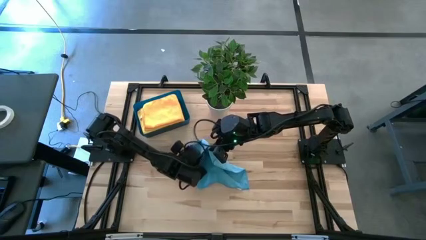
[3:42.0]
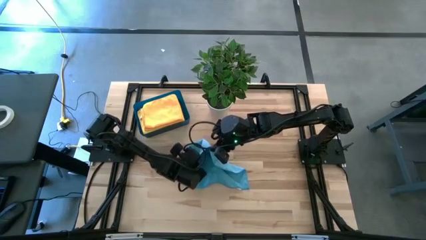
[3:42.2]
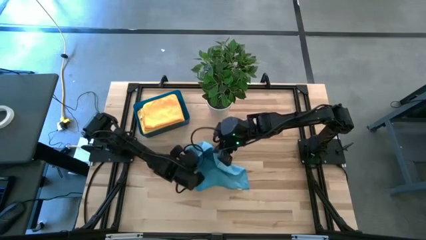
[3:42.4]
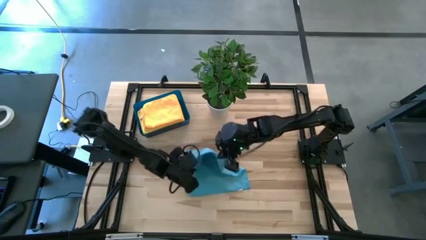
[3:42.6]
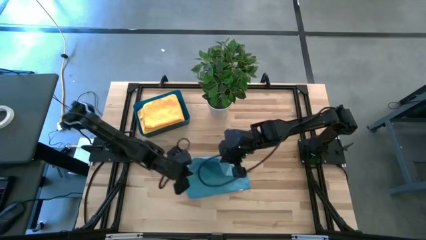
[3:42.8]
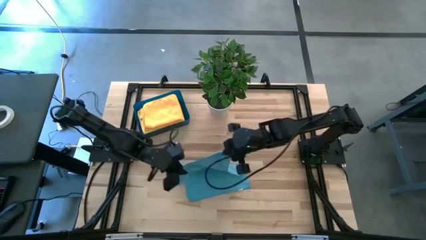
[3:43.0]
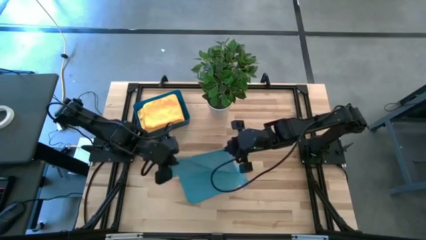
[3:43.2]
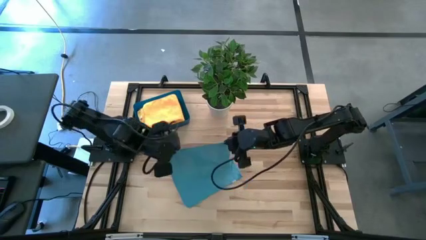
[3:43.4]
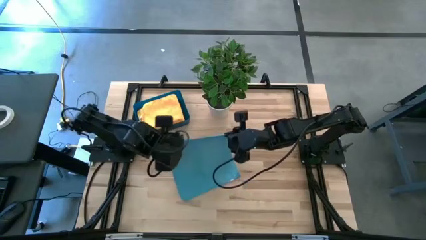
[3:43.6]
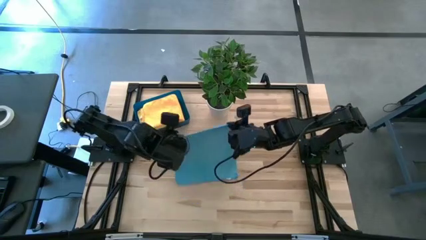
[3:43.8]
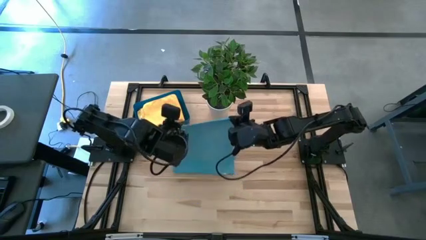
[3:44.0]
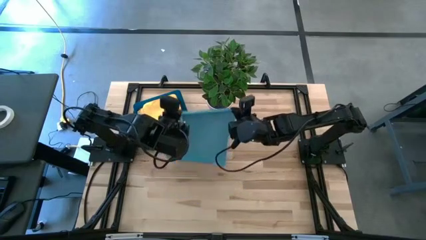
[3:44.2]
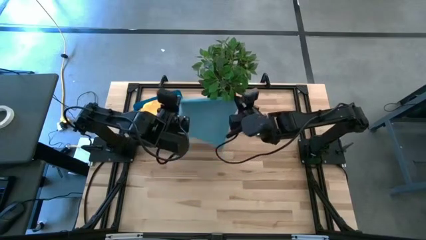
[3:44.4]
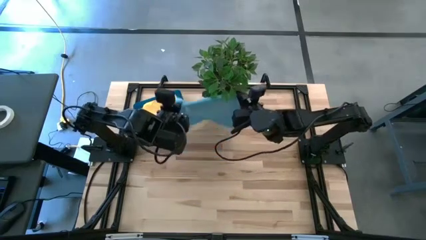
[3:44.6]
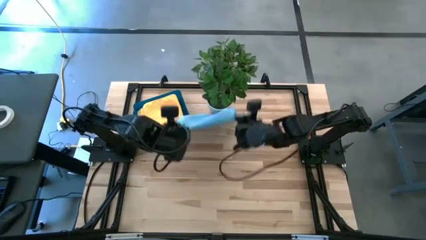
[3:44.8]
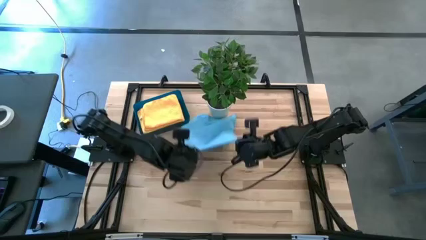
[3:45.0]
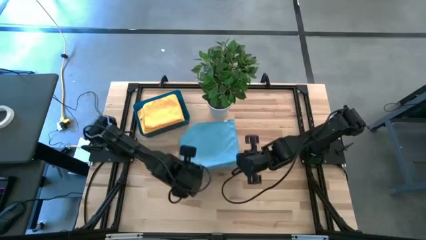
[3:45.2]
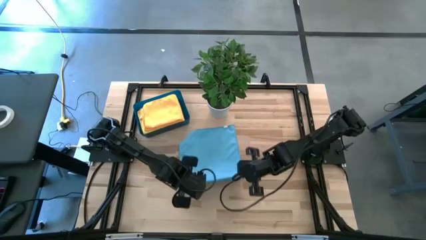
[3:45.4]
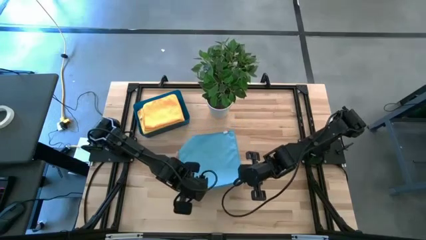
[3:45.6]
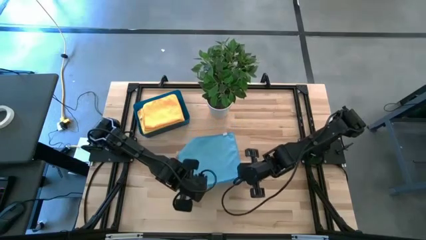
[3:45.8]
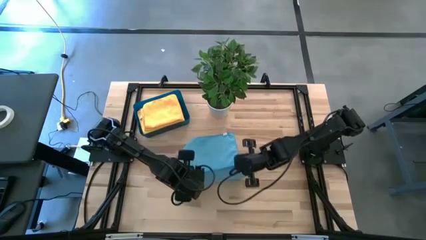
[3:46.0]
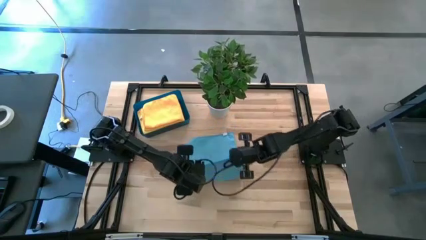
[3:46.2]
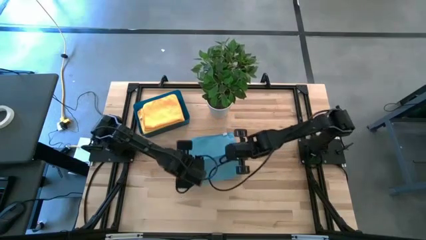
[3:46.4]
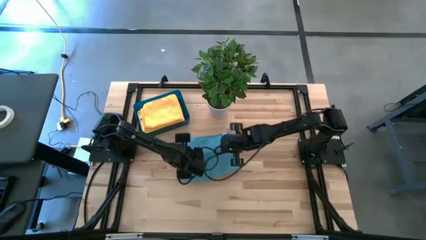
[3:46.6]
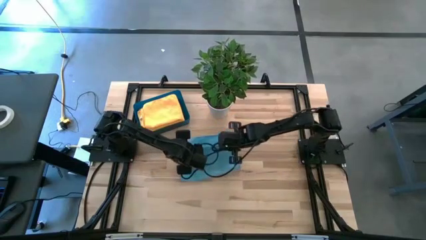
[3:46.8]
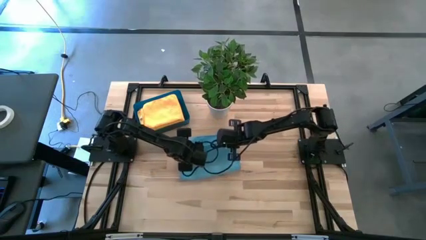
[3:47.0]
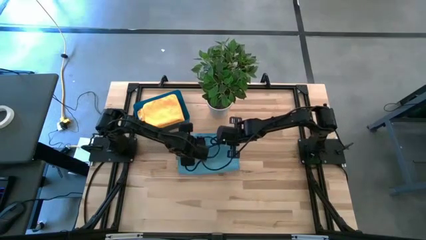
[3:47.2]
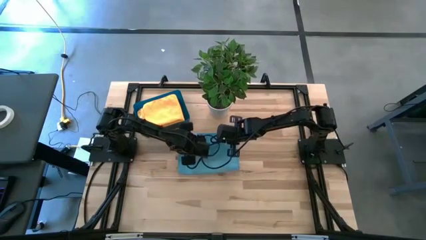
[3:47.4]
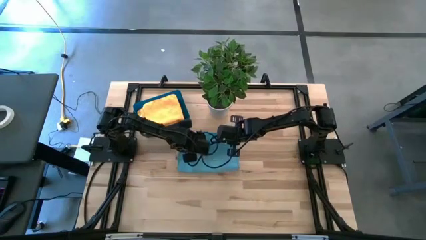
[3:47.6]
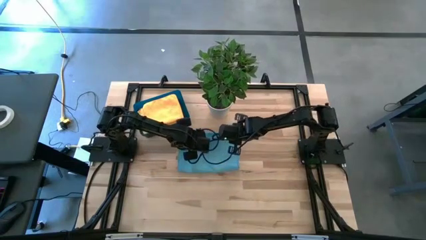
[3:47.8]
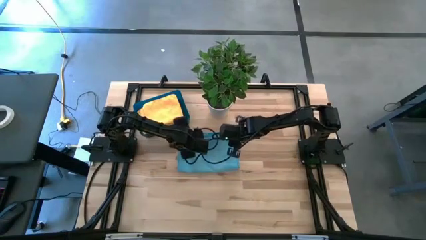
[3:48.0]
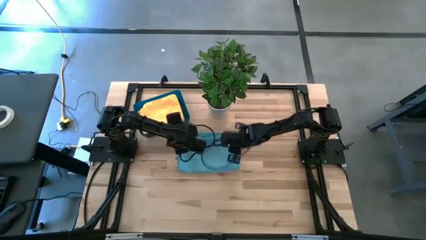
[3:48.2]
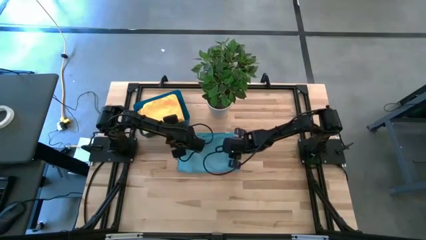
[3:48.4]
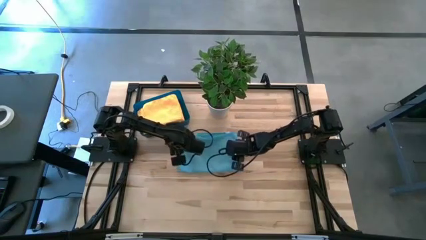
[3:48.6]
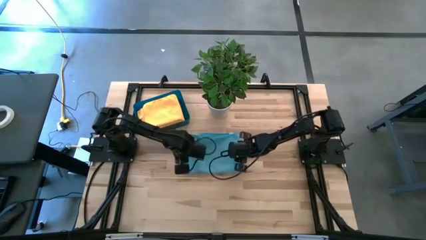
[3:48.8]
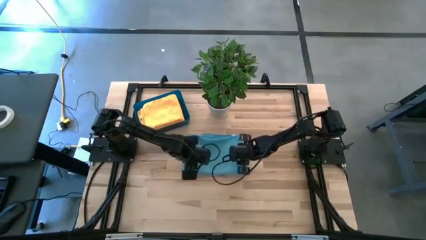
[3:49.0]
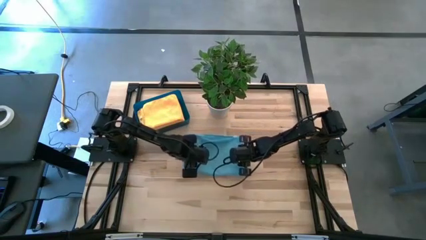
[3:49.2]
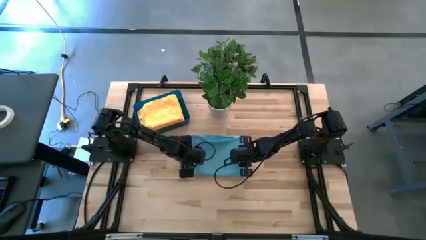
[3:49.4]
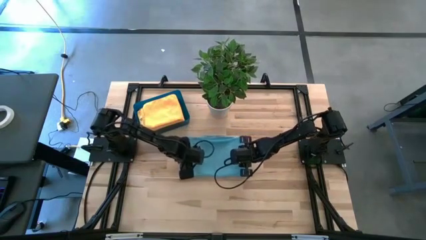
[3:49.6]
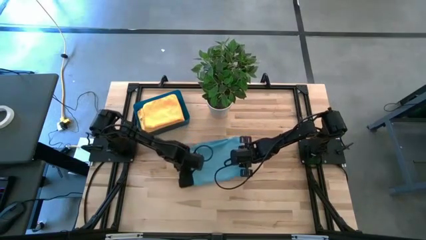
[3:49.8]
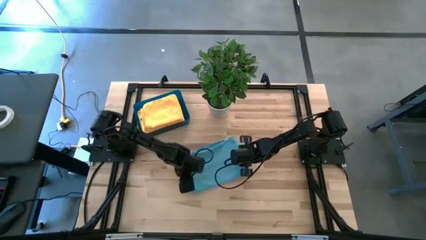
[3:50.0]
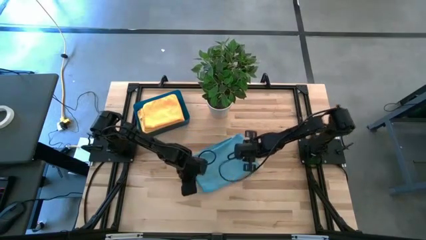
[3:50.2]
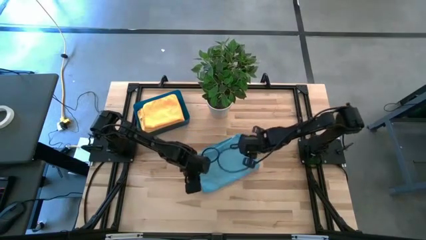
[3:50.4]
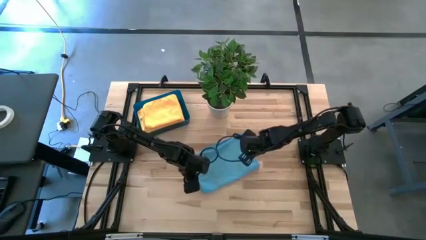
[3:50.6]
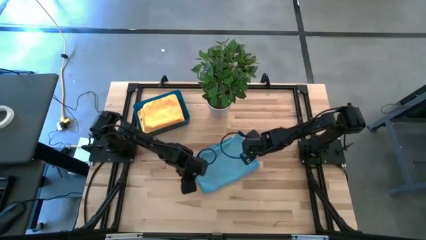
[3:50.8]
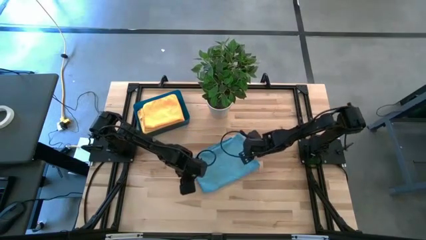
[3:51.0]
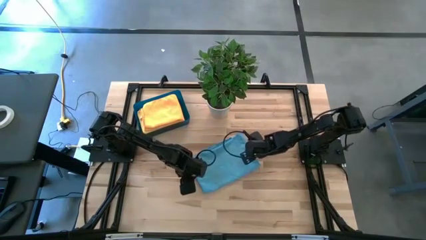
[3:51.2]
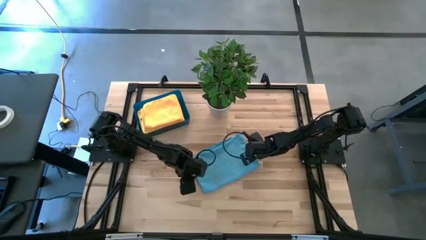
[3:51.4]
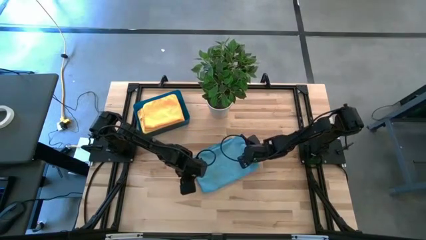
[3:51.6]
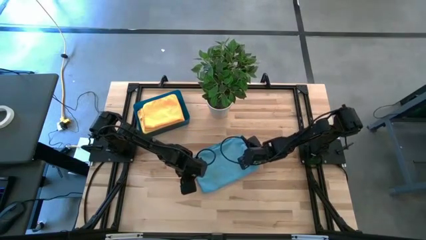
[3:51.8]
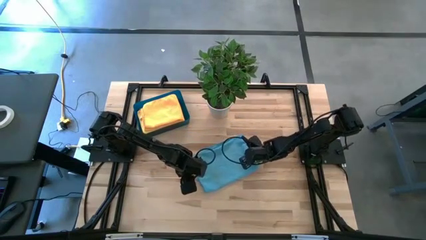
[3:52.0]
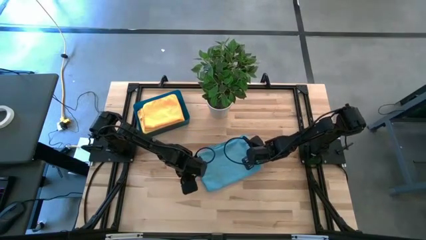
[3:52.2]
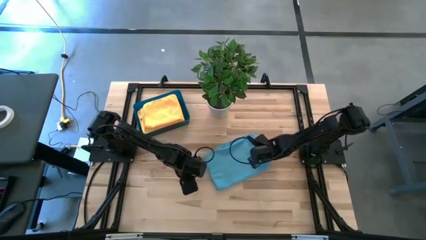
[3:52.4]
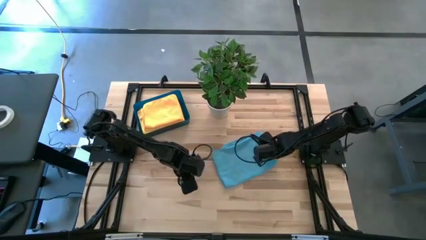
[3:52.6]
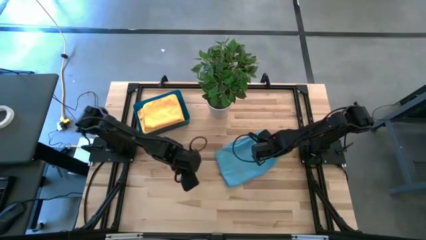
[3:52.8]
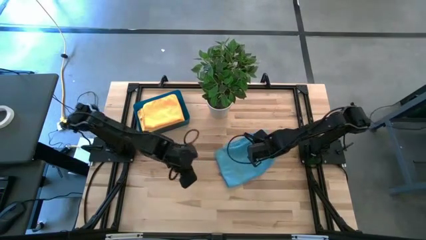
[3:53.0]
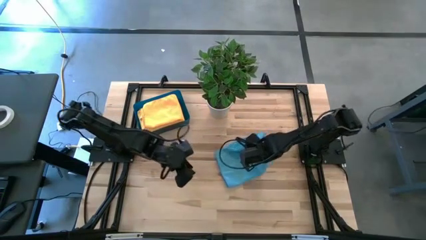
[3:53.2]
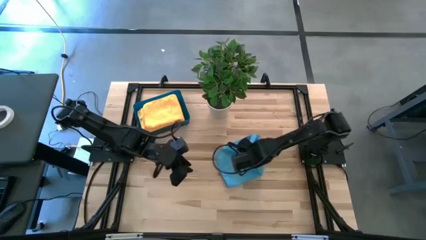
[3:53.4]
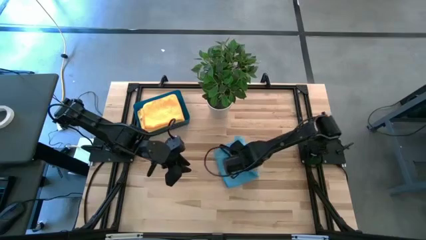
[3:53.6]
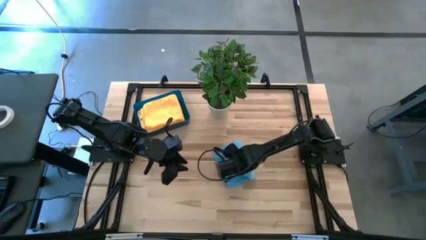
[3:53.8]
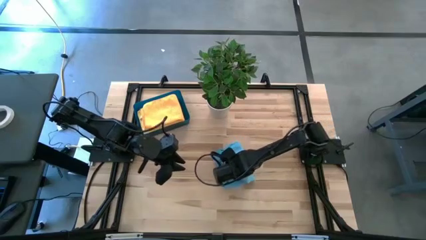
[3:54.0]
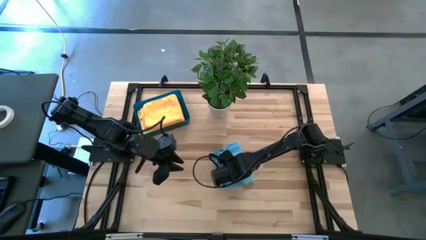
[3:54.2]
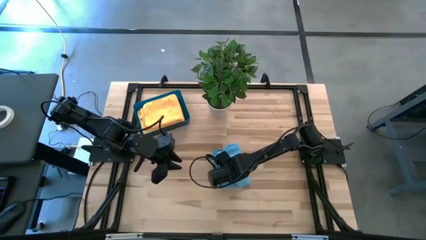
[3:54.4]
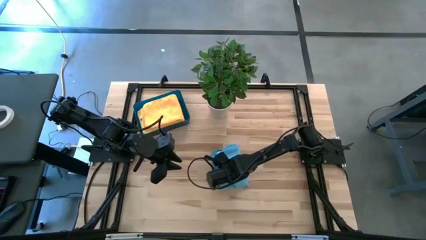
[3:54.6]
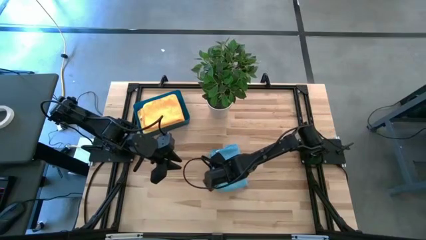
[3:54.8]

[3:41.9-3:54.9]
Task: Fold microfiber towels
Fold the blue towel
